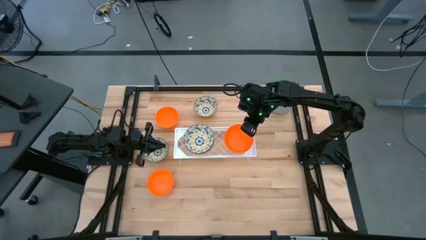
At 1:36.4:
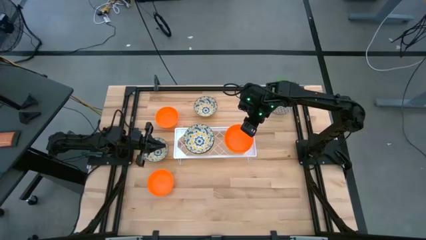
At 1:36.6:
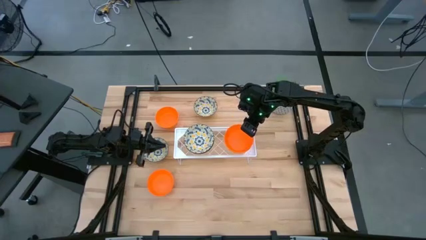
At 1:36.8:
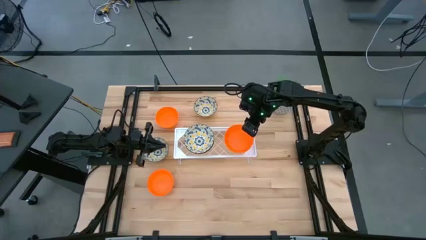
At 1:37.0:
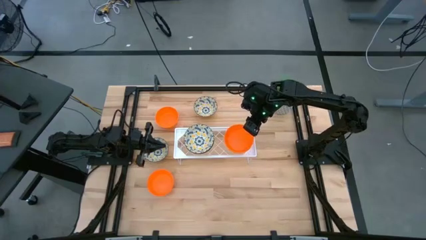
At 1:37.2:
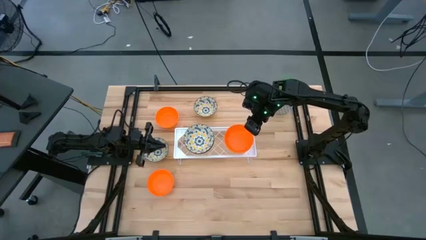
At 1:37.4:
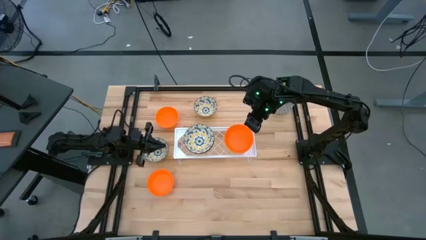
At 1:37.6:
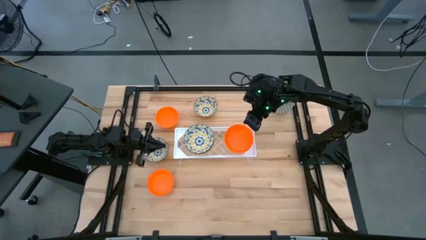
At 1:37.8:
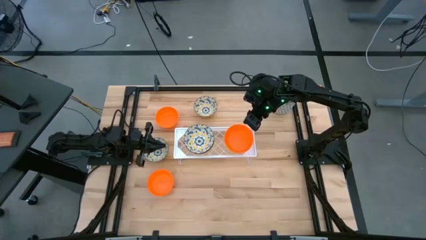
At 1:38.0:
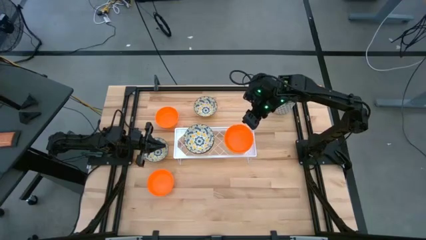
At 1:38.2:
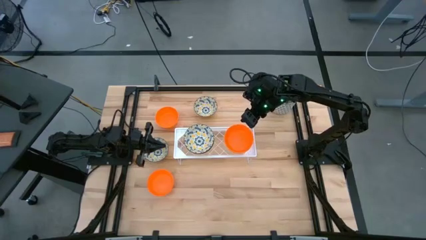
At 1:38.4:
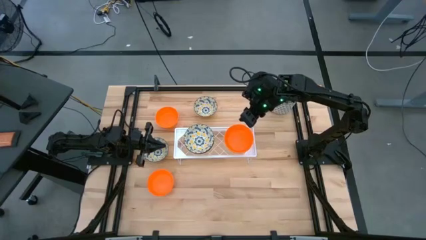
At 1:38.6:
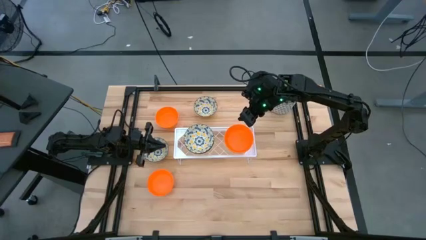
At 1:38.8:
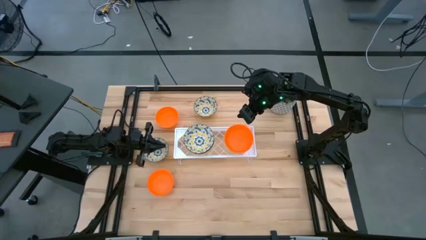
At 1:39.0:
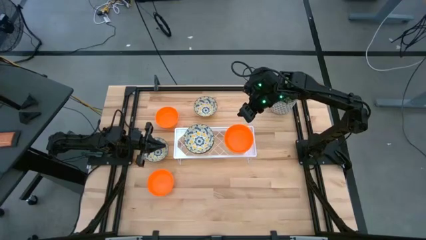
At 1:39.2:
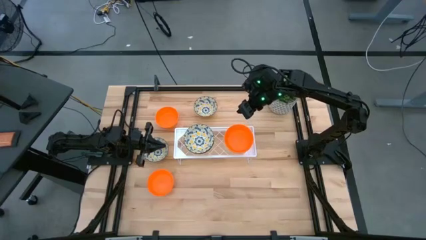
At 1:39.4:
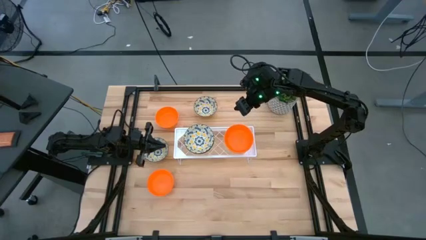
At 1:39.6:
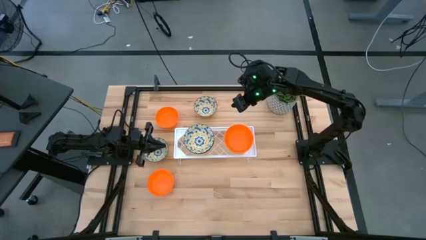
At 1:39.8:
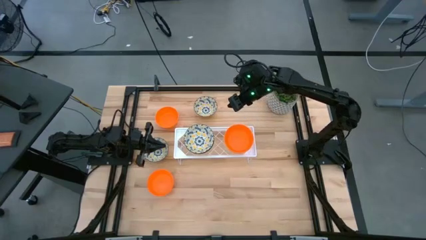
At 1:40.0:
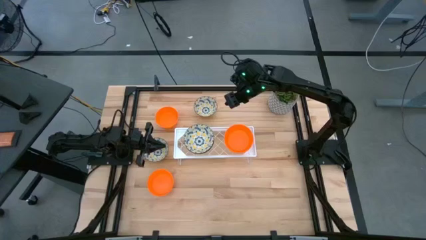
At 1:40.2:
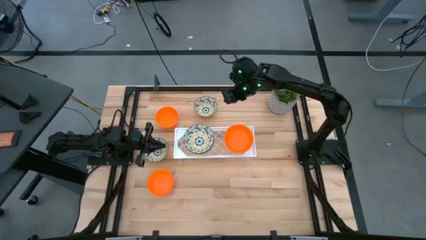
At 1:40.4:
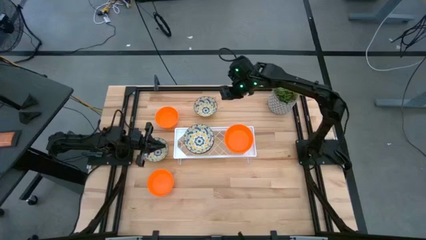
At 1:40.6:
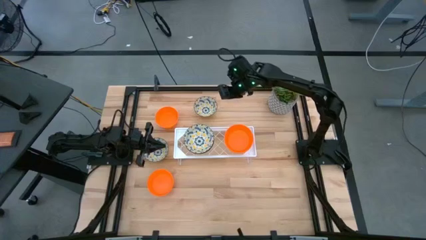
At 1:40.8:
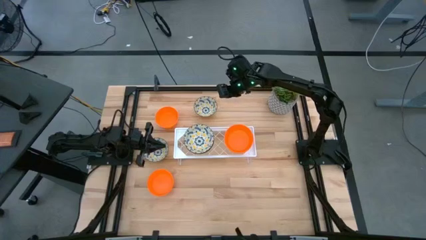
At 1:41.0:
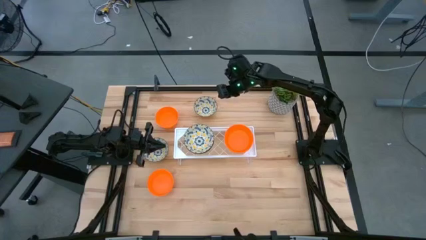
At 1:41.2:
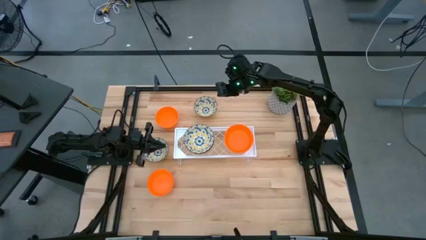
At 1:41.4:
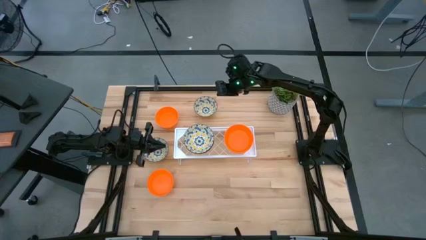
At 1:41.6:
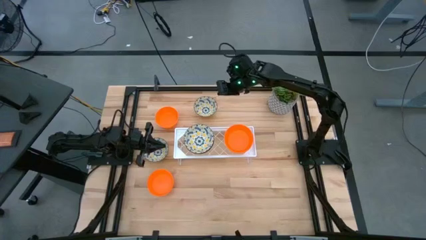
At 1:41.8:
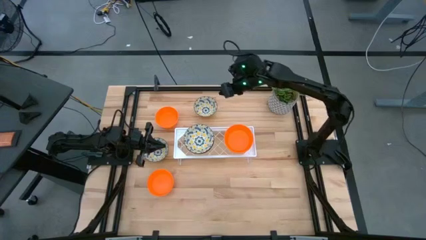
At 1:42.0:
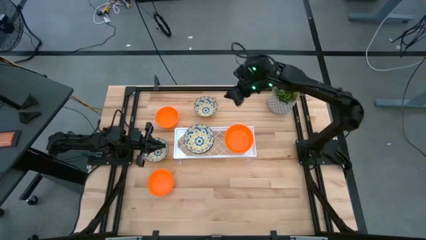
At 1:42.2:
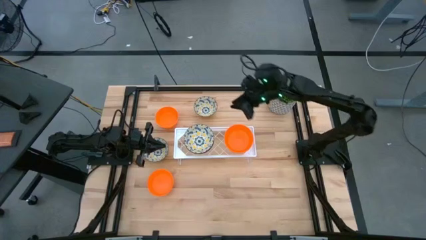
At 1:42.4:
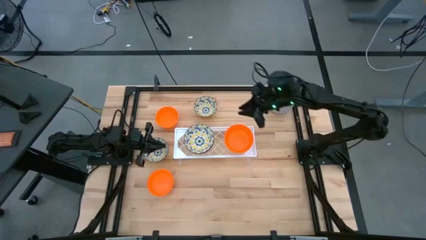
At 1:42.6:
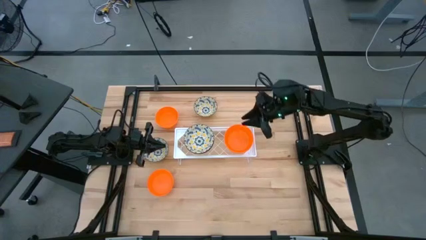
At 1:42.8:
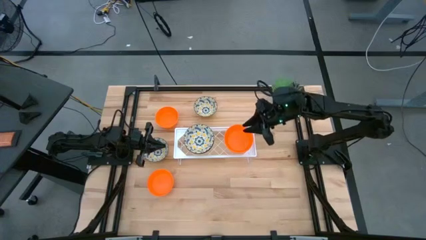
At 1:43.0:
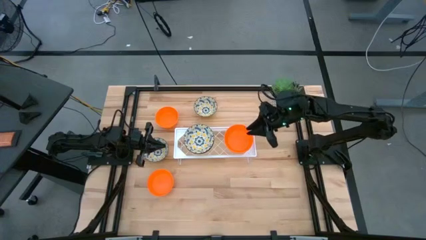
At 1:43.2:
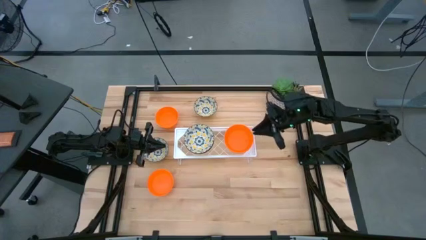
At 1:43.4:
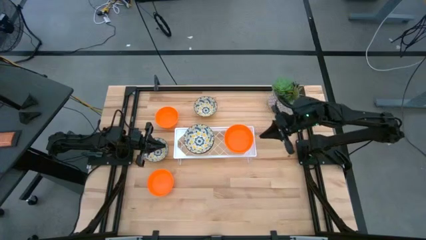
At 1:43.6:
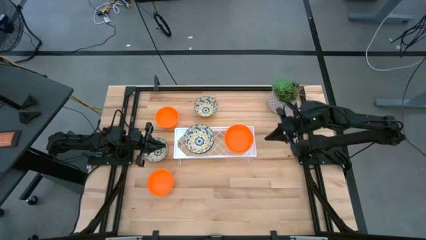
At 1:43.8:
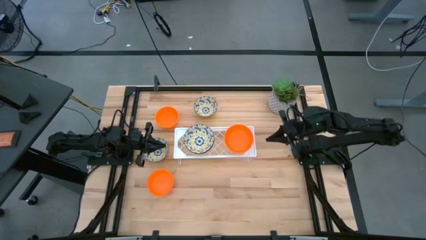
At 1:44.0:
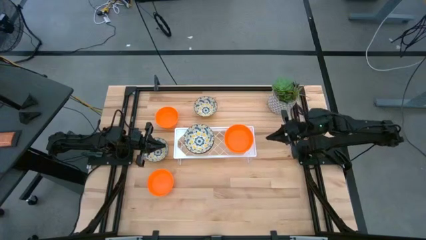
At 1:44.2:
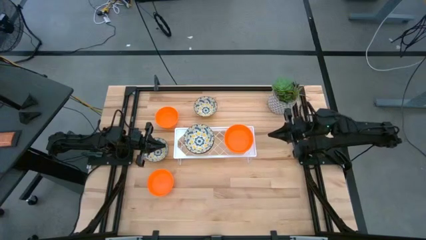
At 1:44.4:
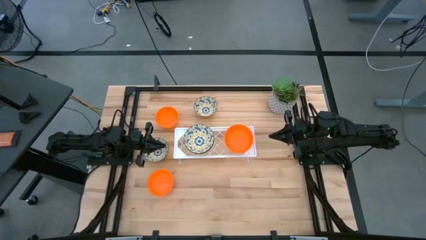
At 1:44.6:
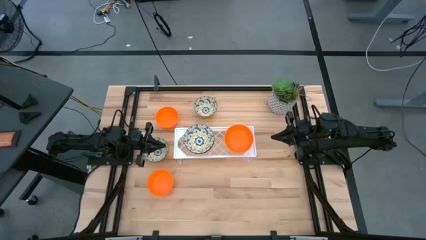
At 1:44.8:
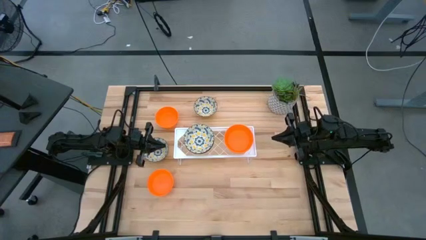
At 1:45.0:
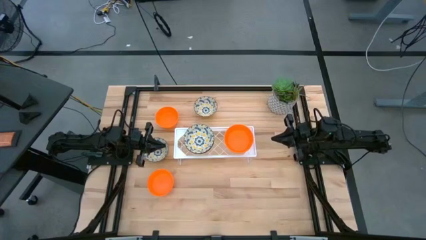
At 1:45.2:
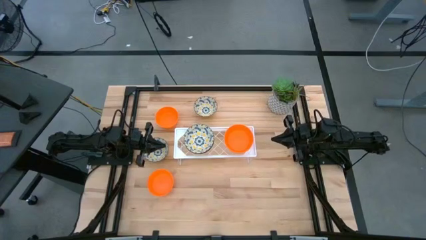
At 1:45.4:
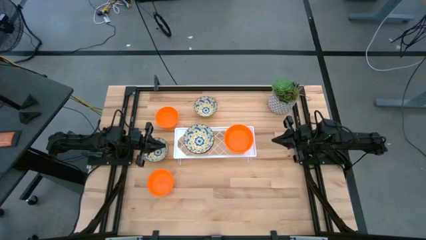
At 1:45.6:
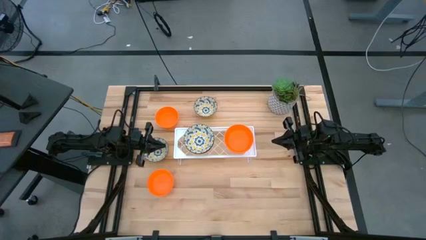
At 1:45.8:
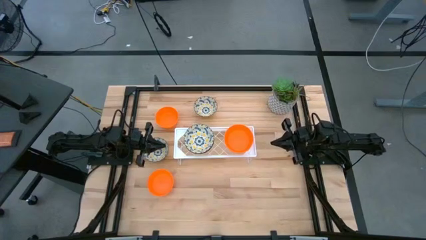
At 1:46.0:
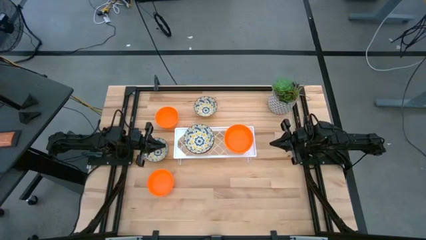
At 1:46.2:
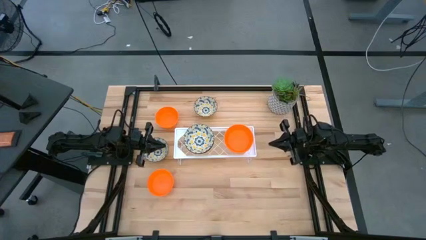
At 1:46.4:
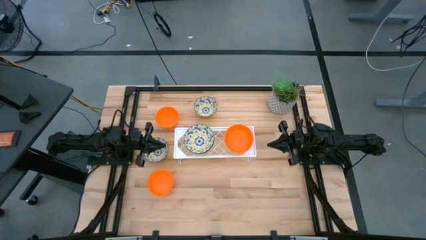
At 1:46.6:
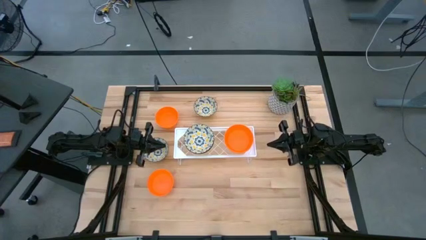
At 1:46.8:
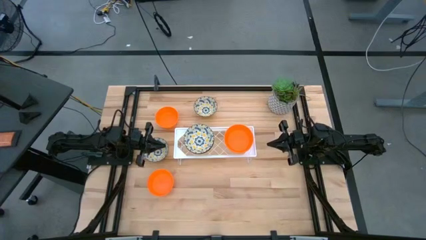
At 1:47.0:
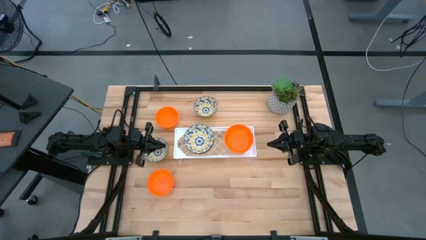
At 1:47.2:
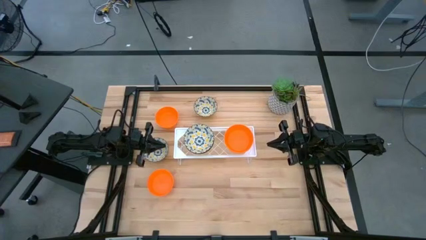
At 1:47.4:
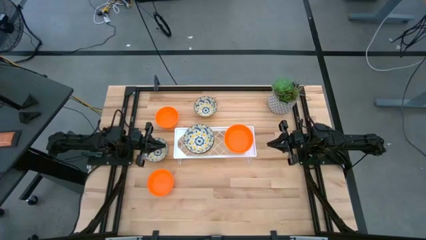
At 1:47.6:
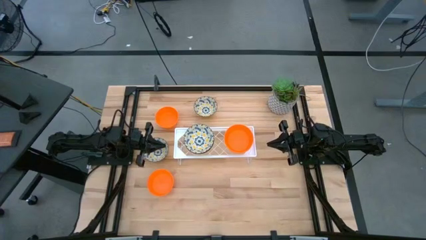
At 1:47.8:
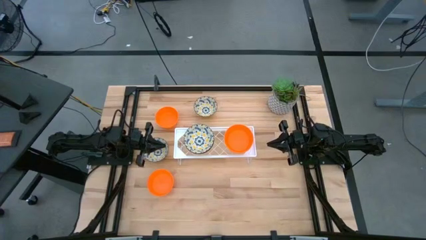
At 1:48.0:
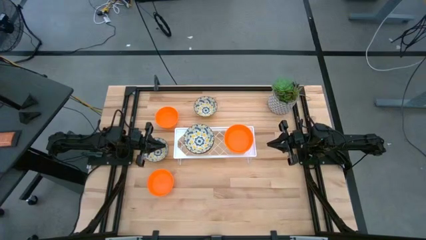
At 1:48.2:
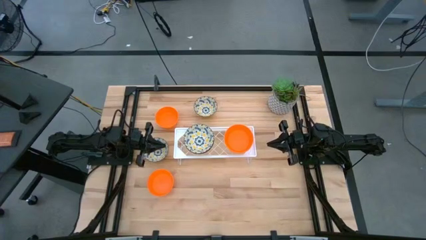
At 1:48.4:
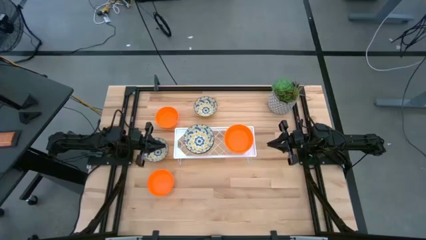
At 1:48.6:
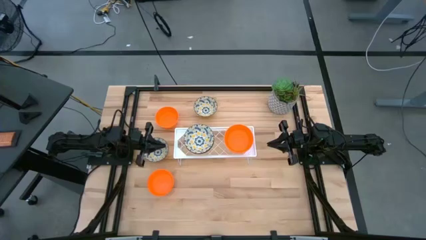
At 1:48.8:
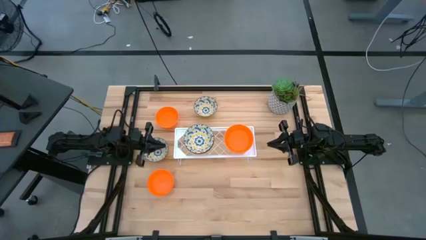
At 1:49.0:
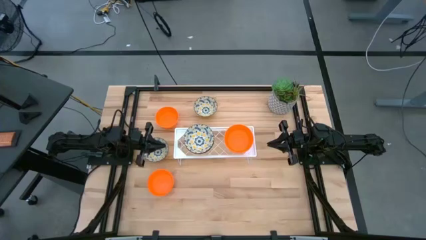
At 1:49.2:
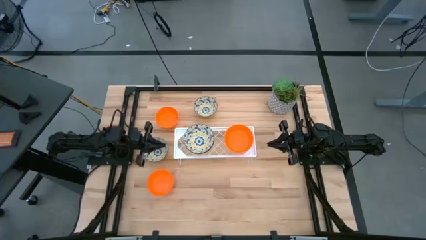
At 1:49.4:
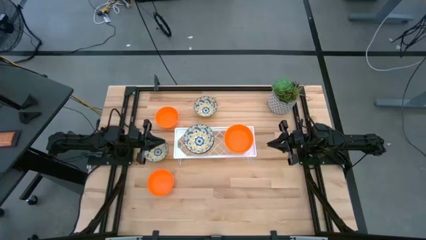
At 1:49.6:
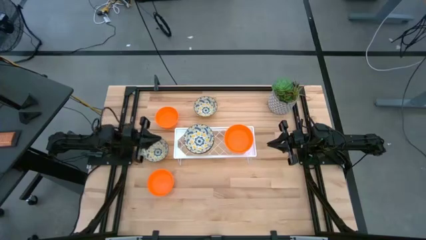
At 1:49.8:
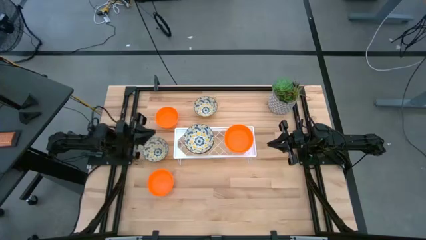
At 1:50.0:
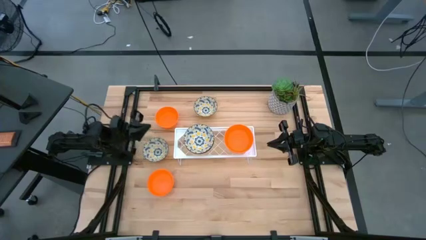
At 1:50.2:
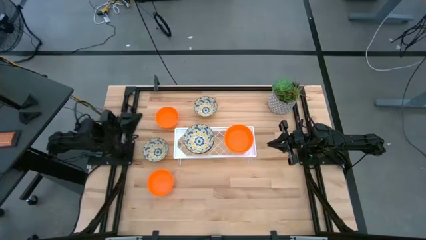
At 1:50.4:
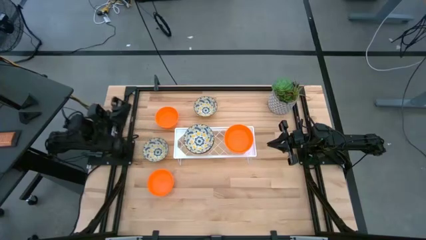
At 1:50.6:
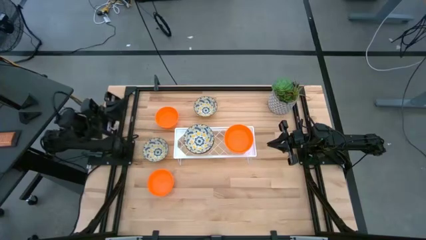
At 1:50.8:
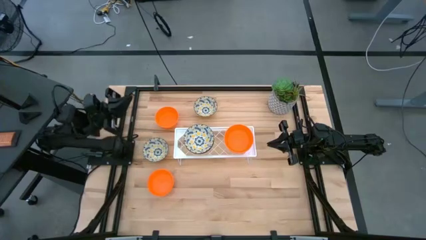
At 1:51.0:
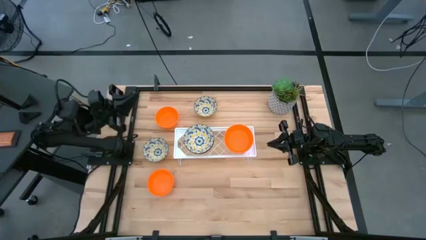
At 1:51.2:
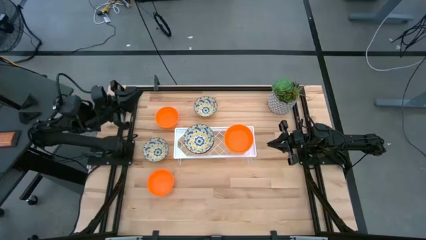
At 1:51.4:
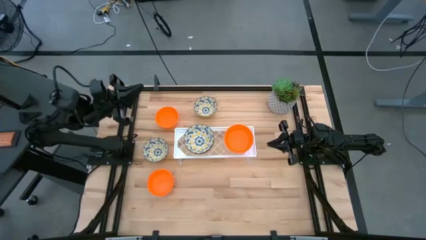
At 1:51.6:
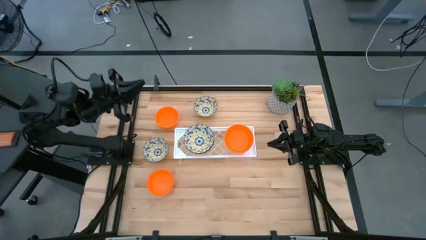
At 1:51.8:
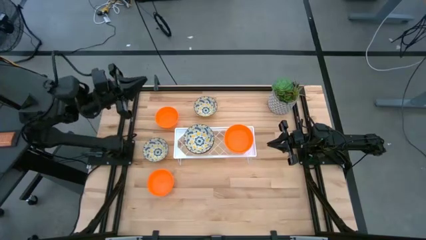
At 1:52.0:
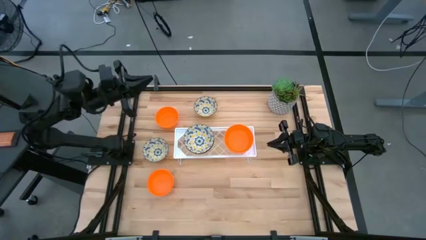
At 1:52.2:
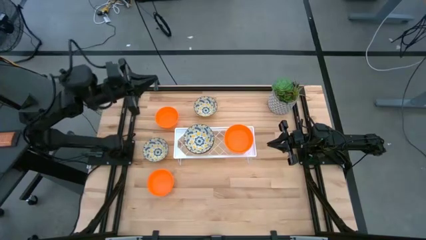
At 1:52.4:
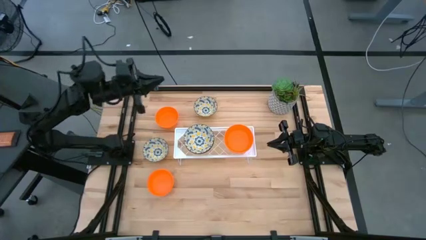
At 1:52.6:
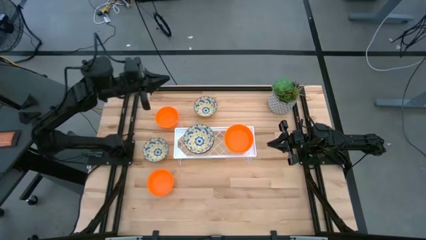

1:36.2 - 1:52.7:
Task: Pick & Place Mini bowls
Stack the white patterned bowl on the white patterned bowl on the shelf
